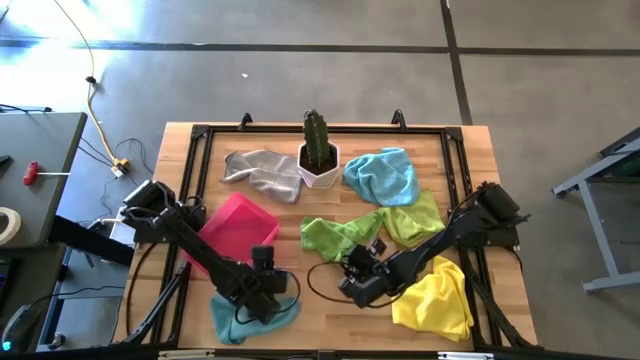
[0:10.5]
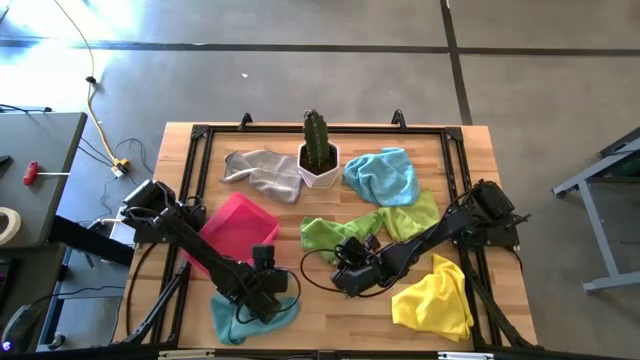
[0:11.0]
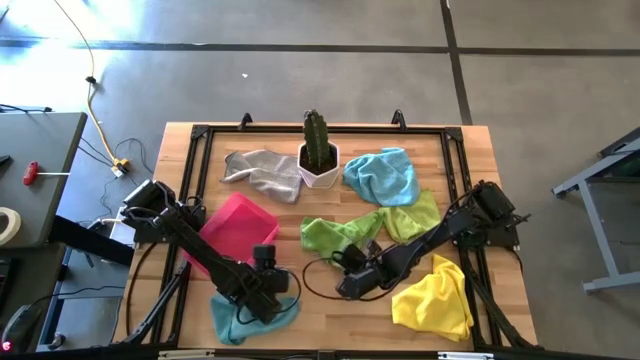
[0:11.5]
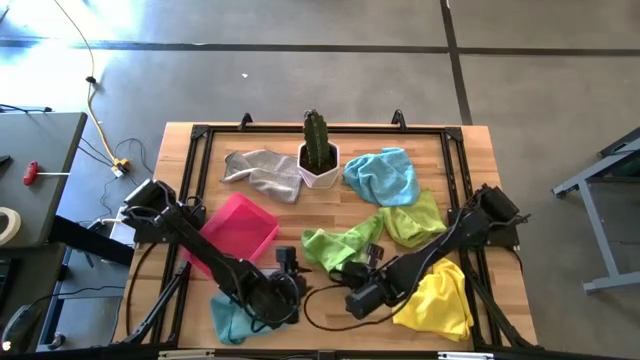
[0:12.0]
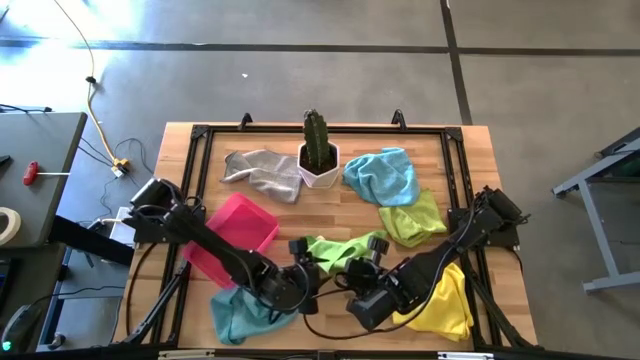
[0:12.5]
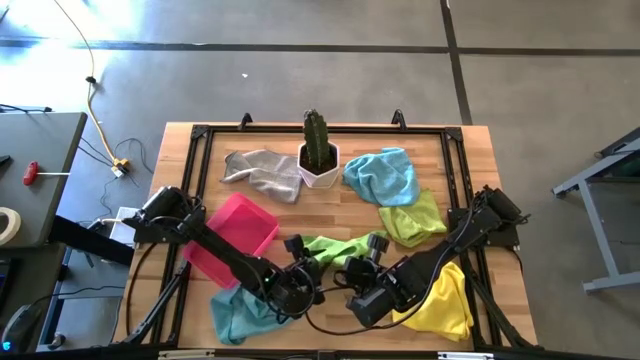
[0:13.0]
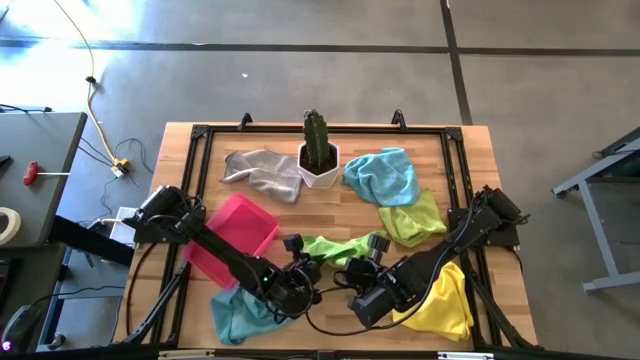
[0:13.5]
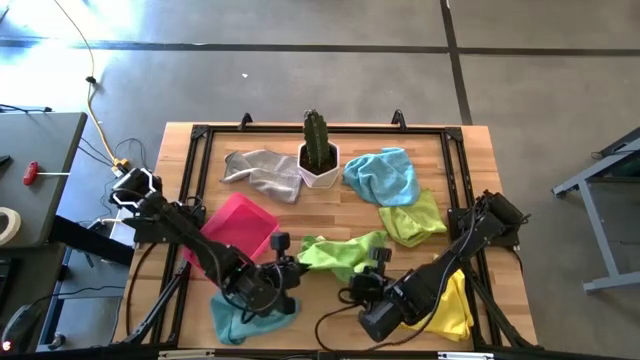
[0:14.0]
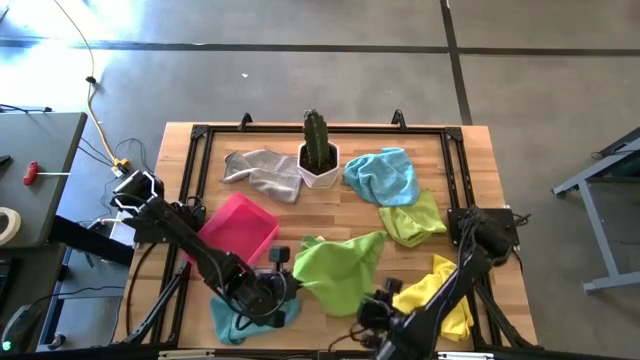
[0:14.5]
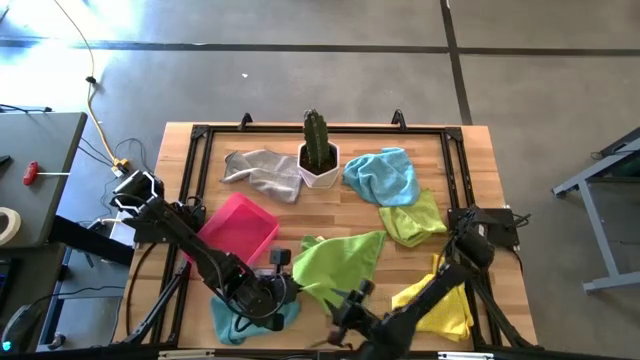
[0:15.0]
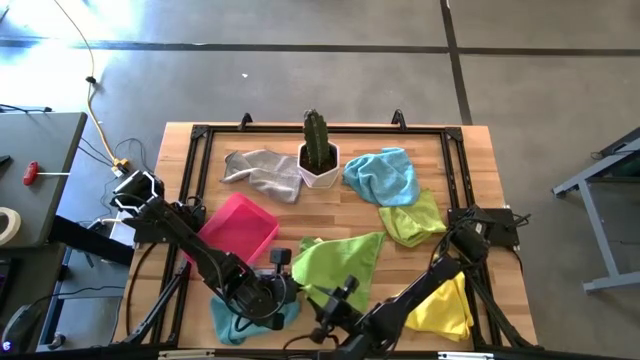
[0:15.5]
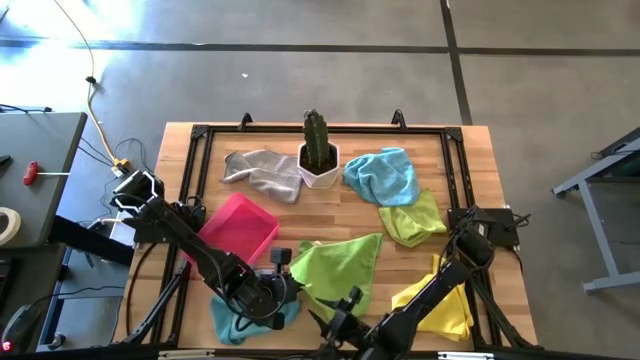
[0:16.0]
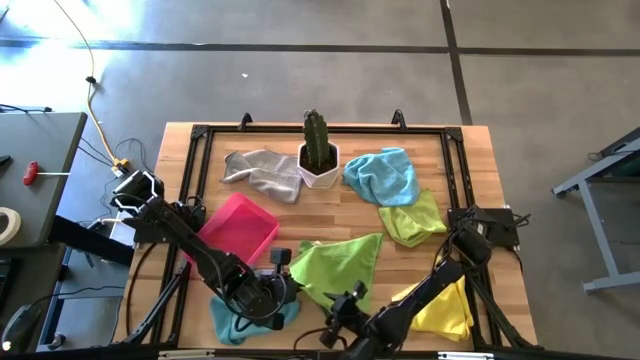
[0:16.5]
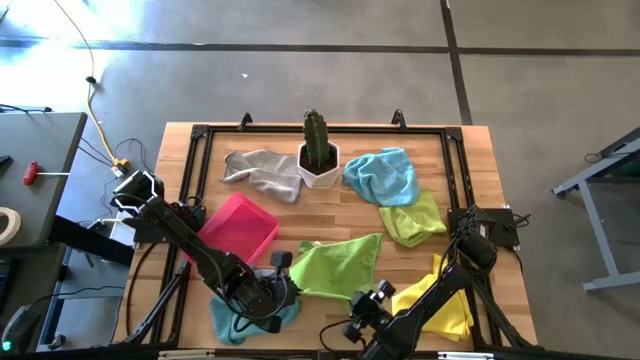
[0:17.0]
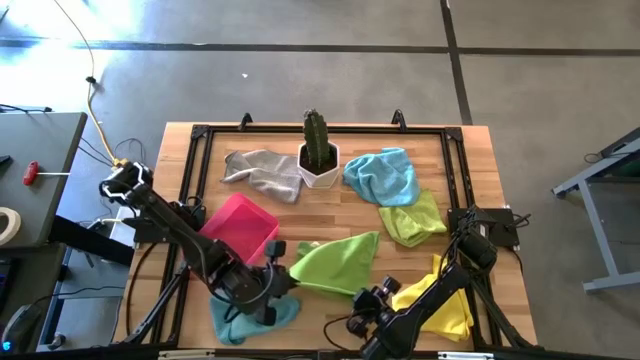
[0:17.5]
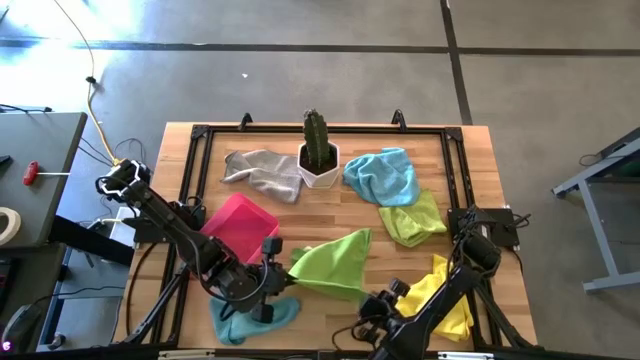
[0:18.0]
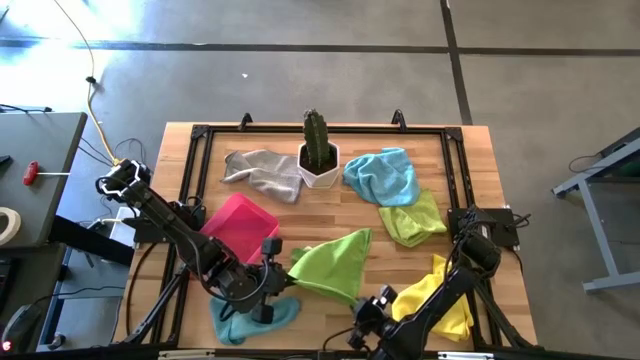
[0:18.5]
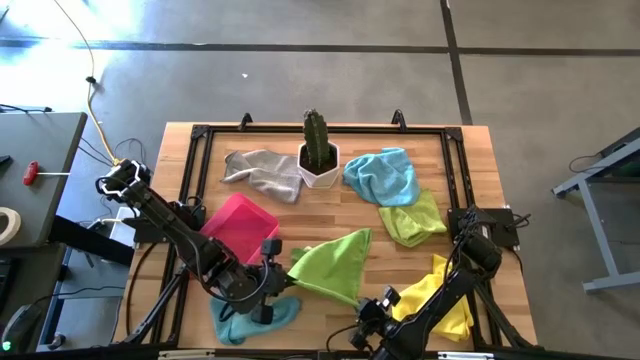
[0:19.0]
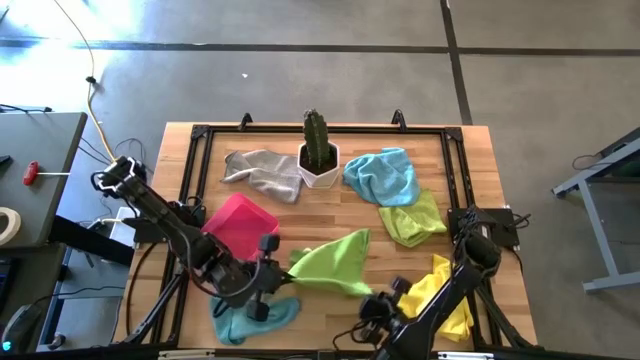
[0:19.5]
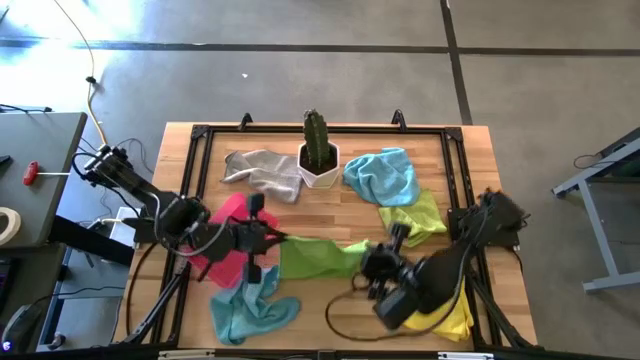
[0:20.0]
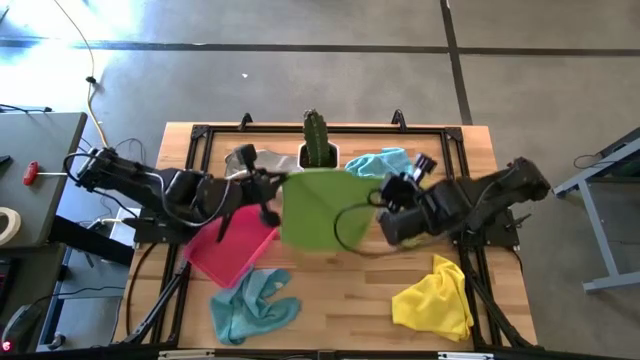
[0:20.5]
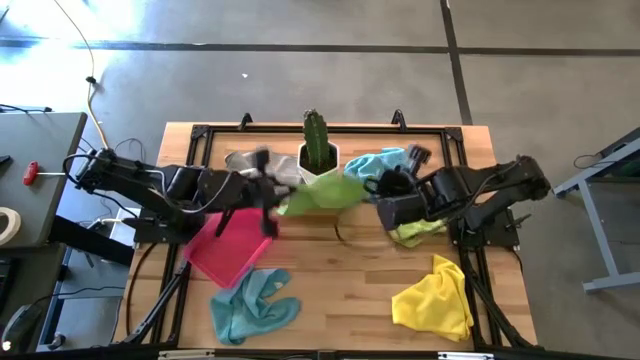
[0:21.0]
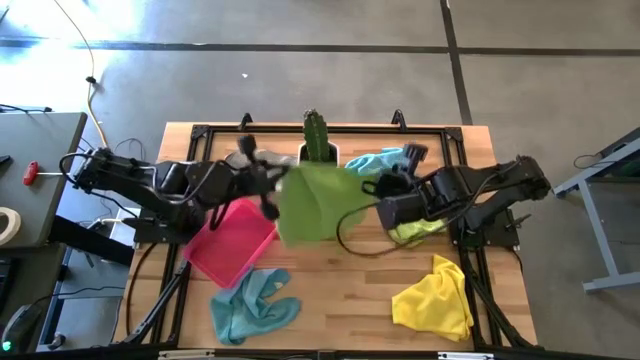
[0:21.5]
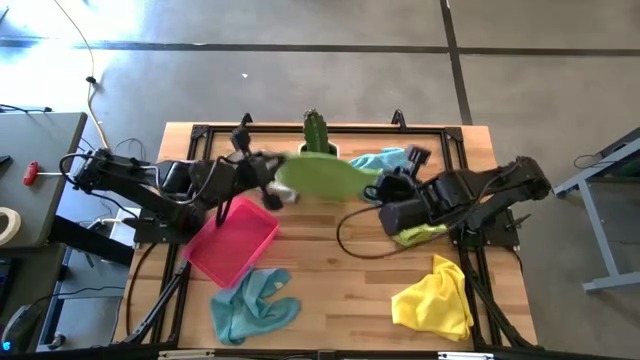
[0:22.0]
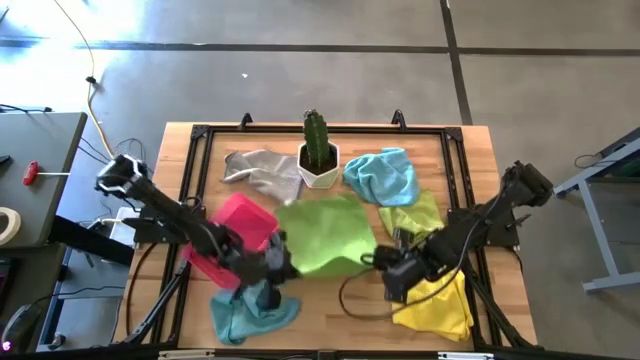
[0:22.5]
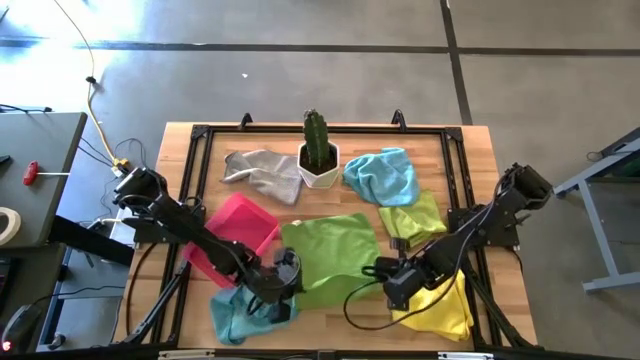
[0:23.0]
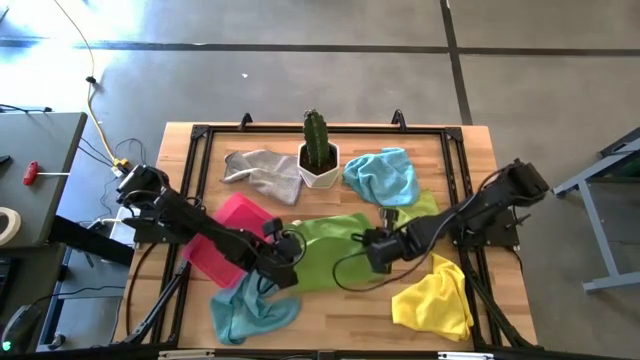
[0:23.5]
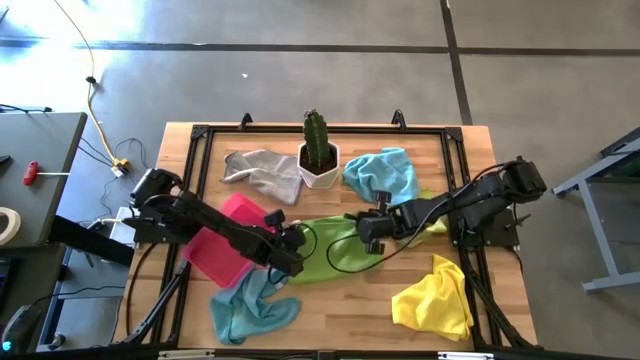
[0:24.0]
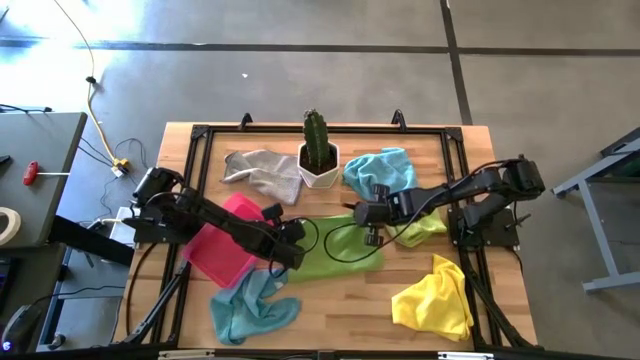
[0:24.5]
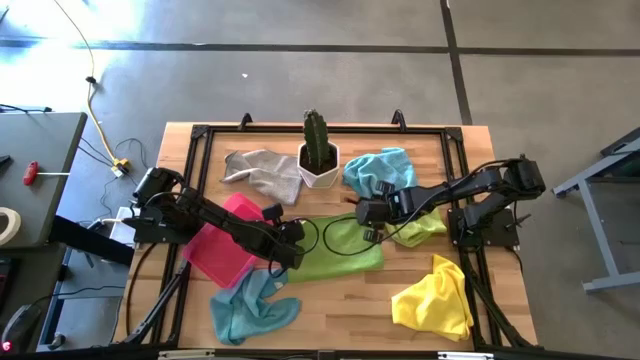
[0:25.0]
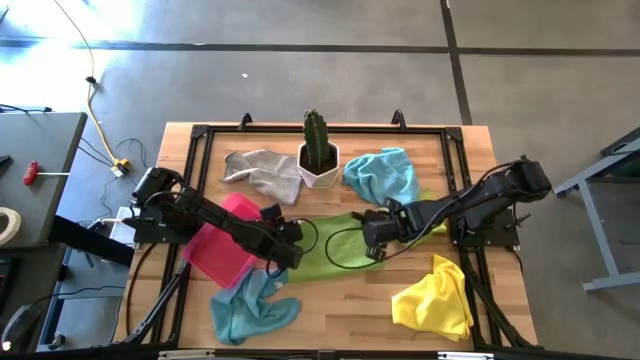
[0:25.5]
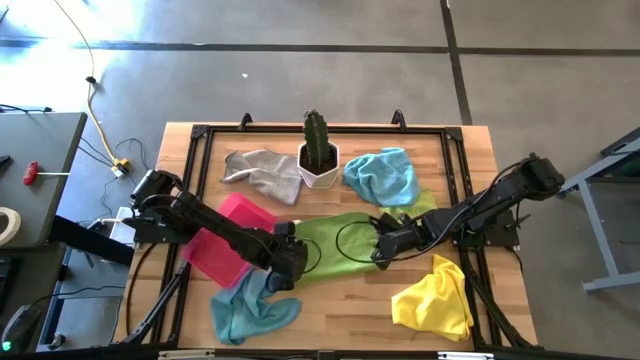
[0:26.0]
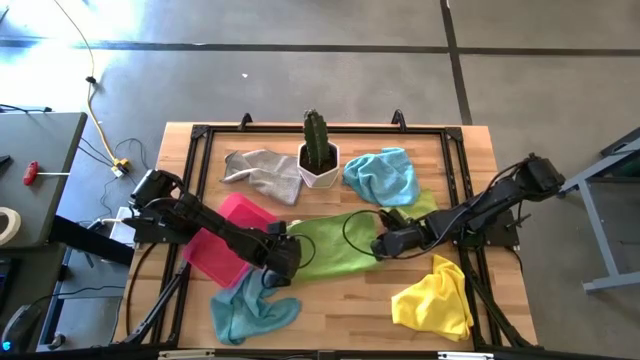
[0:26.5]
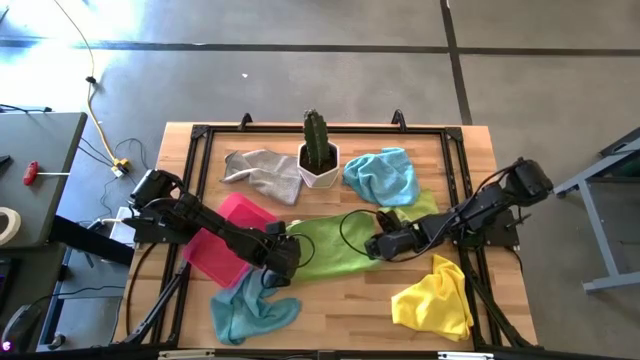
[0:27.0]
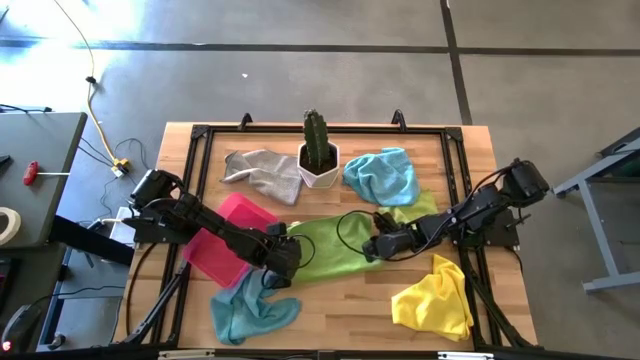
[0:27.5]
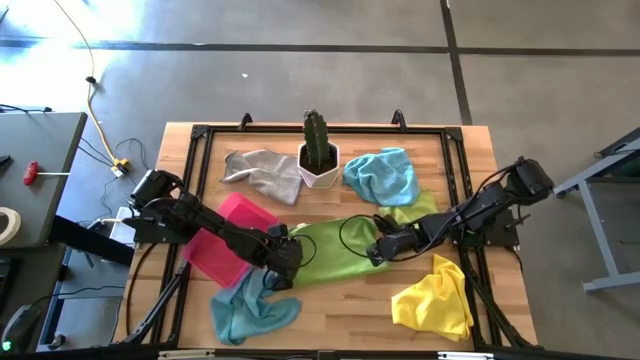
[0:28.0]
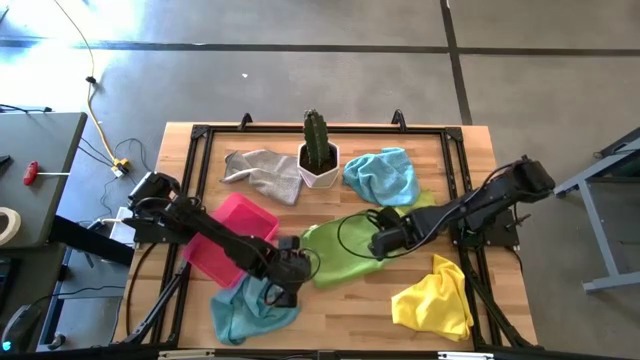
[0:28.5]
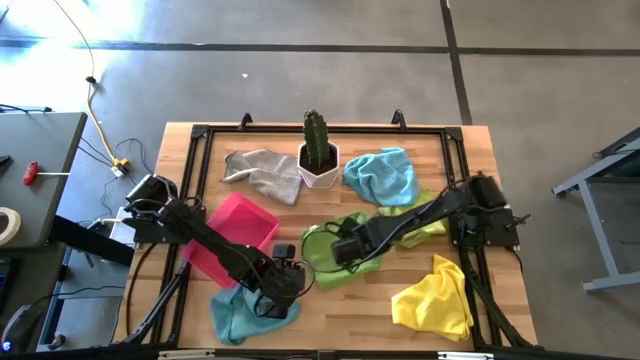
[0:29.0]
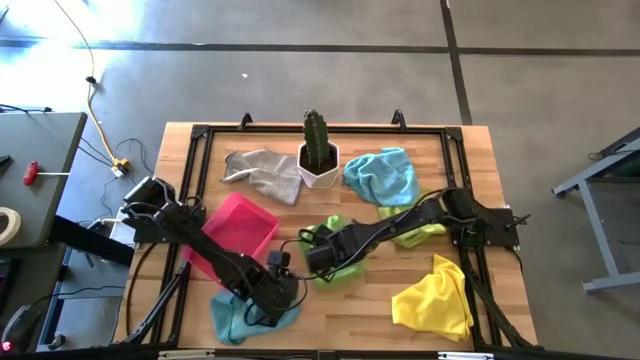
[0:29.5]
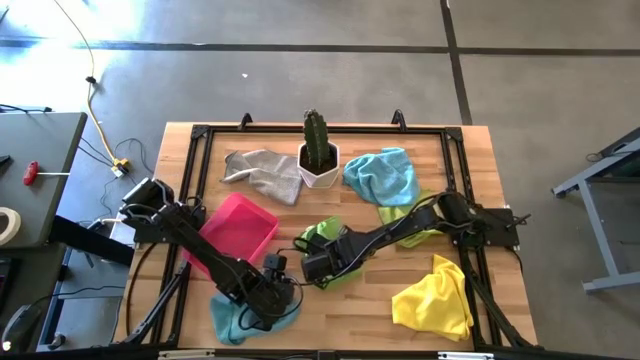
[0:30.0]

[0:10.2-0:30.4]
Task: Fold microfiber towels
Fold the green towel

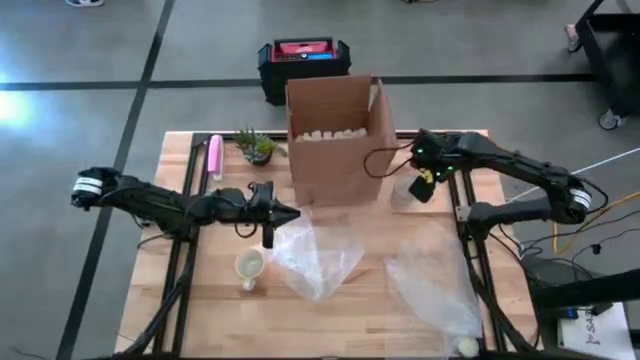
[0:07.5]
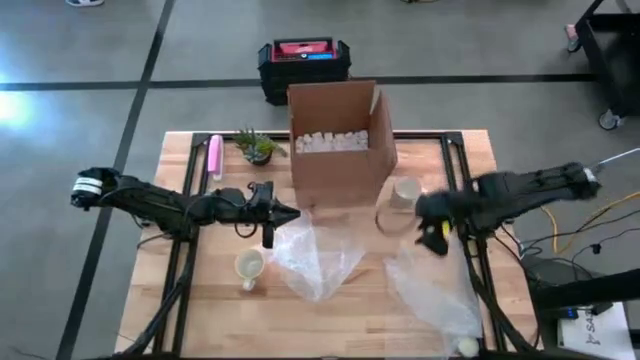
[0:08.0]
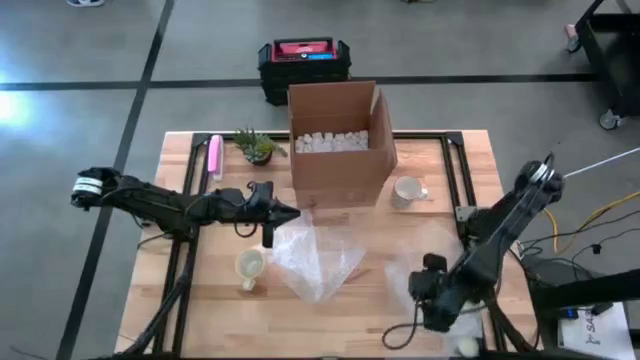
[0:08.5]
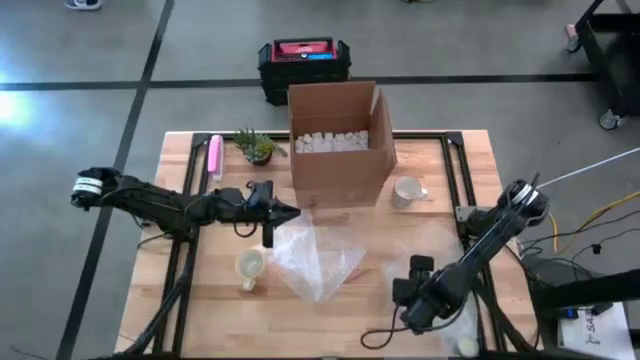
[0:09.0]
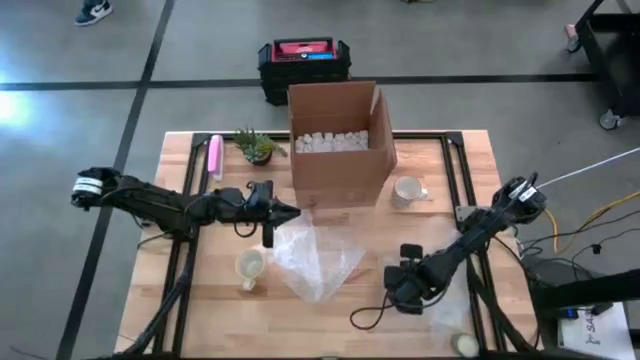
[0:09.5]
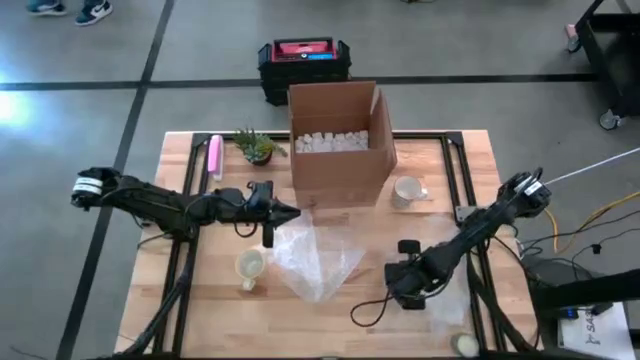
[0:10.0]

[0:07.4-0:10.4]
Task: wrap mug
Wrap the gray patterned mug using the right bubble wrap
